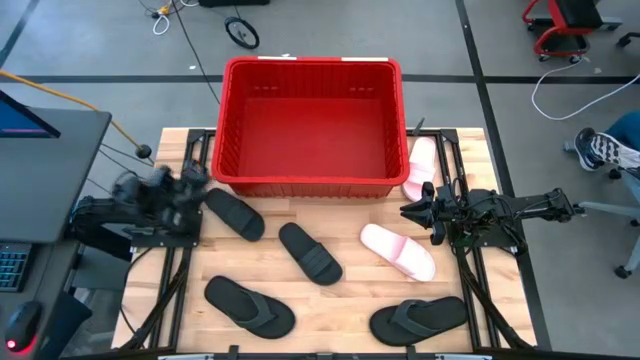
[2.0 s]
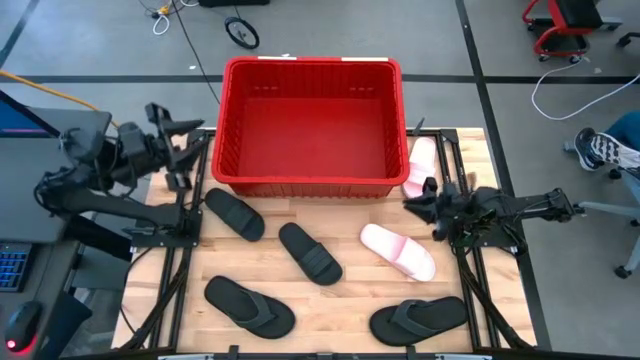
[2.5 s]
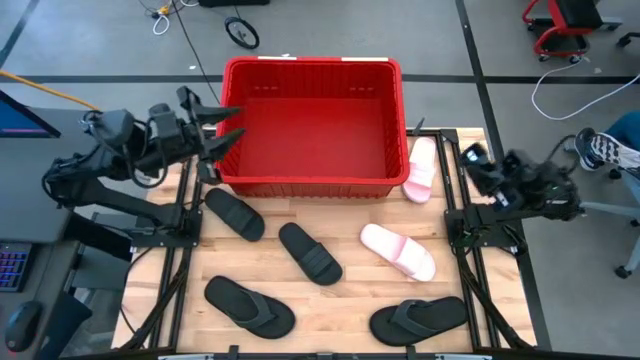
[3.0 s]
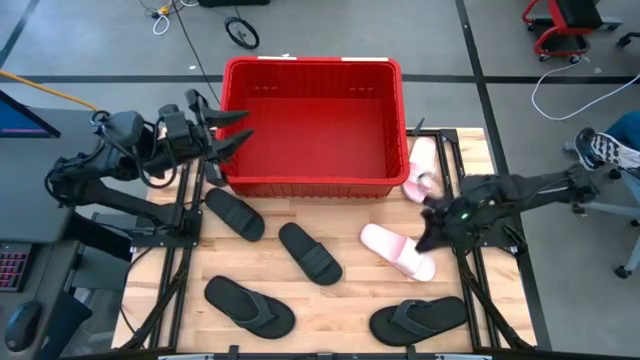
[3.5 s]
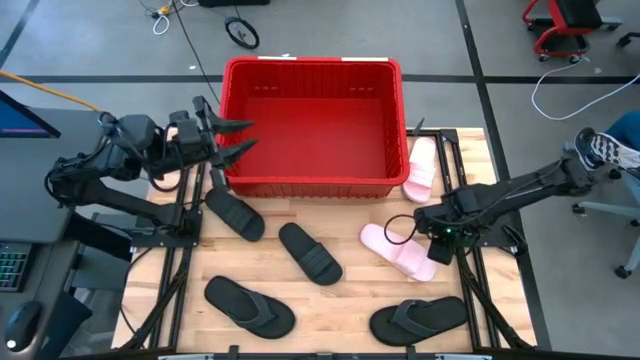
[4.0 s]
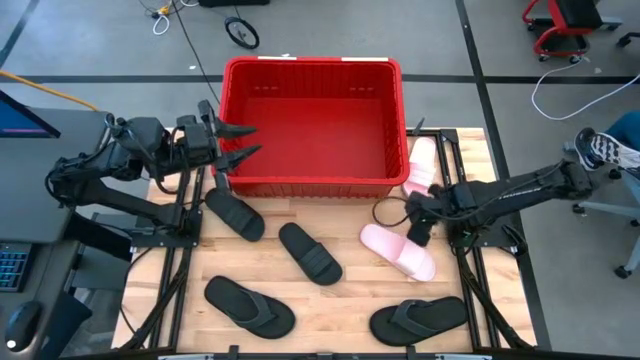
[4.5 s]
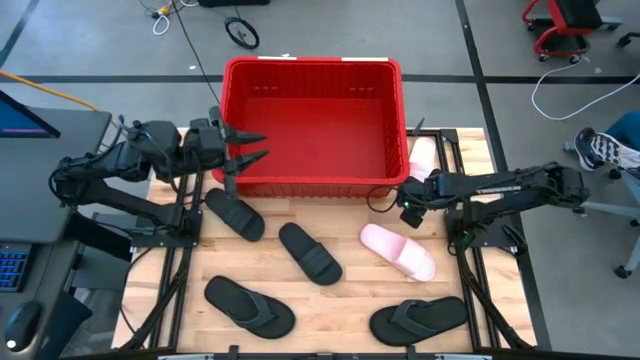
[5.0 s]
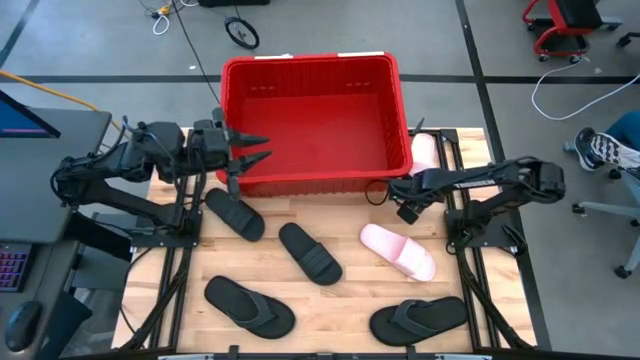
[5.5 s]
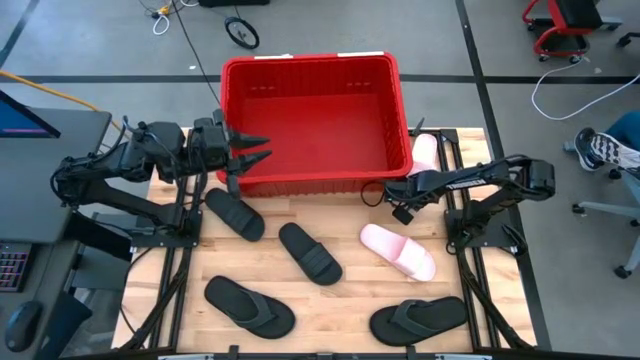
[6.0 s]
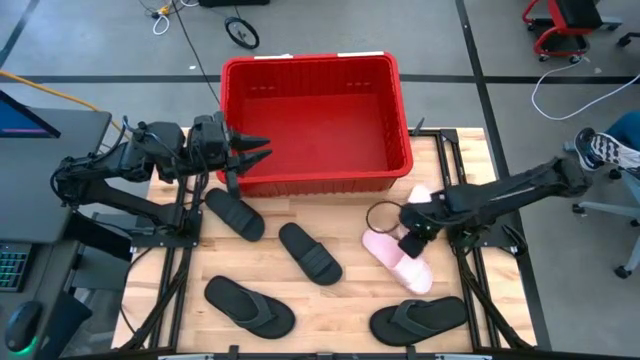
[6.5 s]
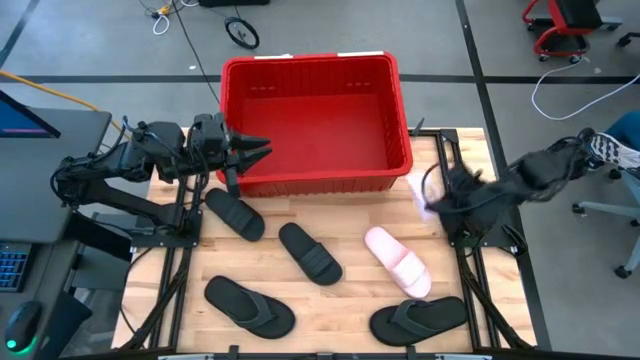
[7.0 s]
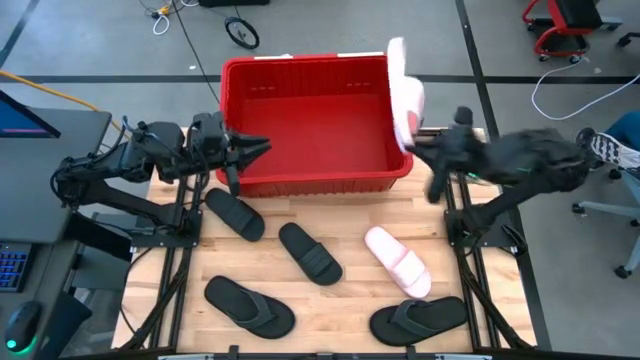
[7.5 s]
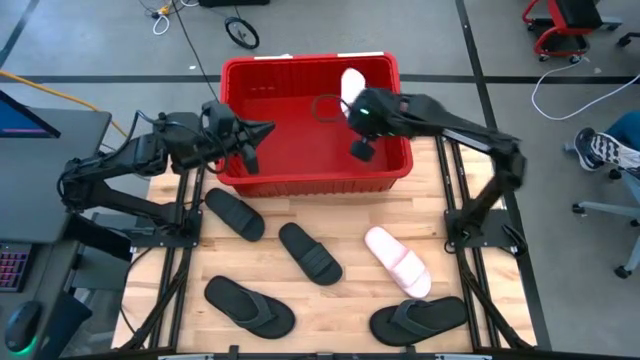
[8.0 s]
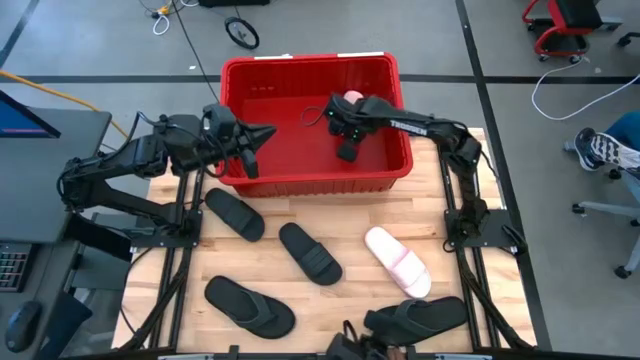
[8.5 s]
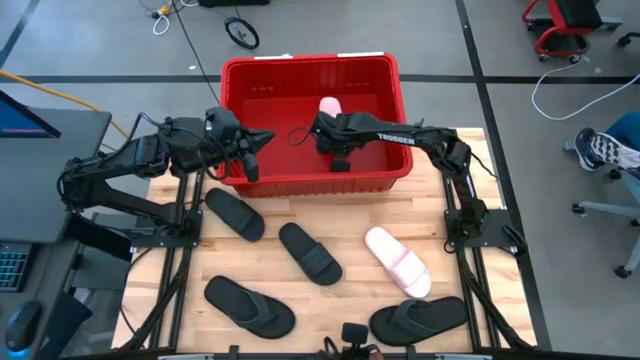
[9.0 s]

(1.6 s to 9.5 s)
Task: Pick and place slides into bin
Put the top pink slide into the red bin

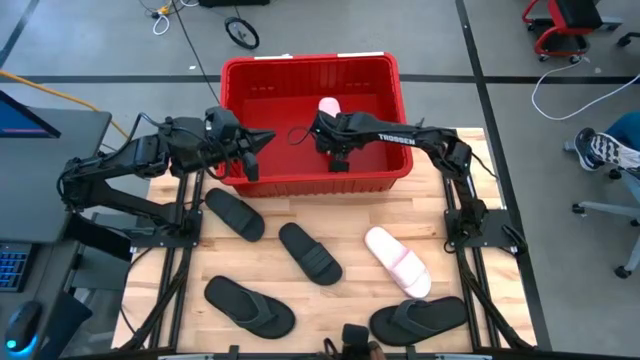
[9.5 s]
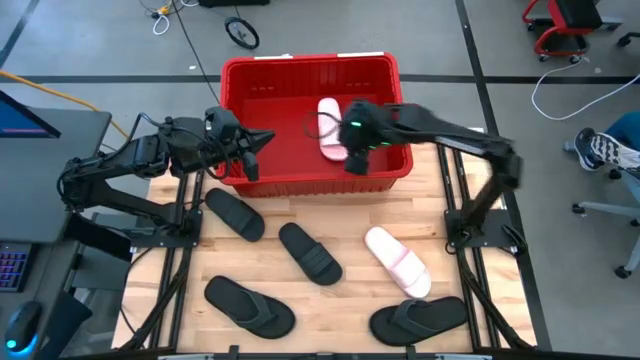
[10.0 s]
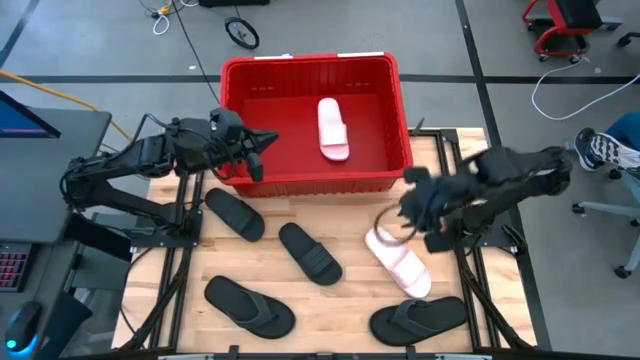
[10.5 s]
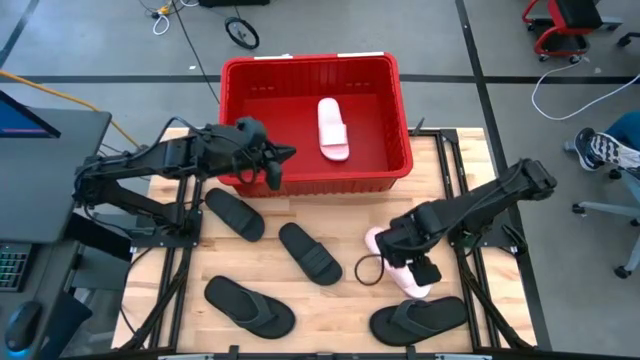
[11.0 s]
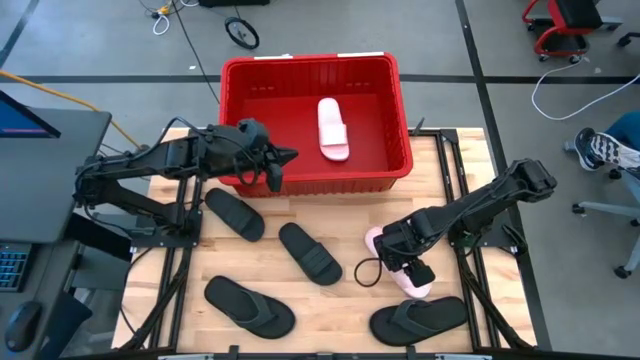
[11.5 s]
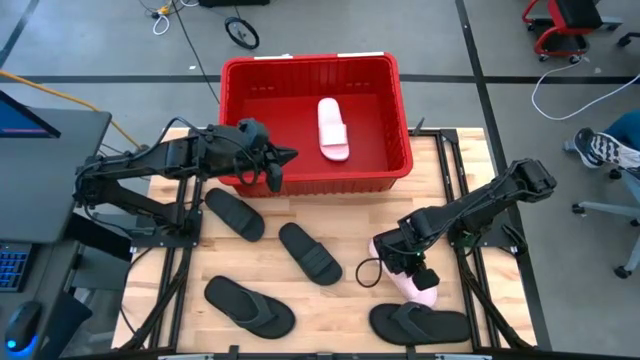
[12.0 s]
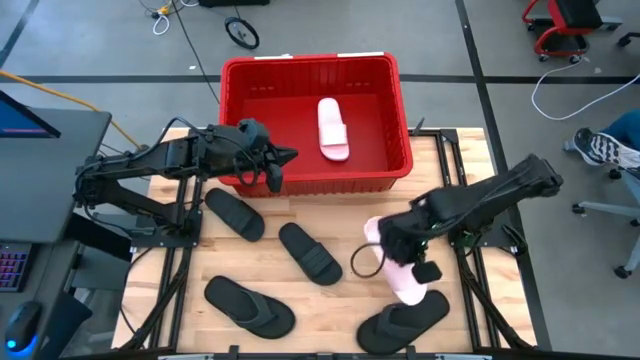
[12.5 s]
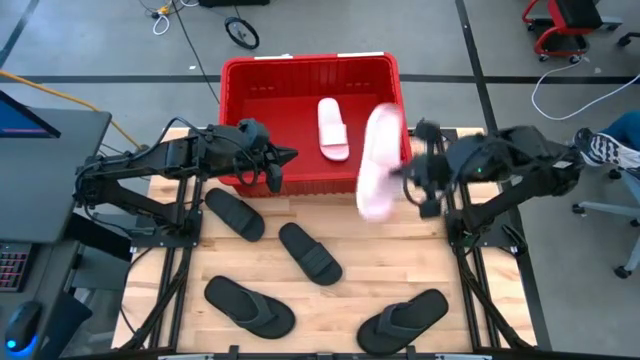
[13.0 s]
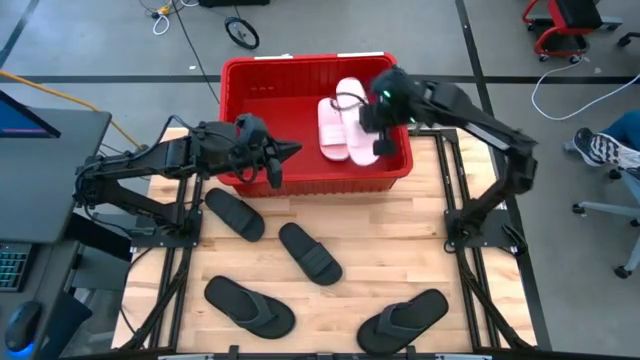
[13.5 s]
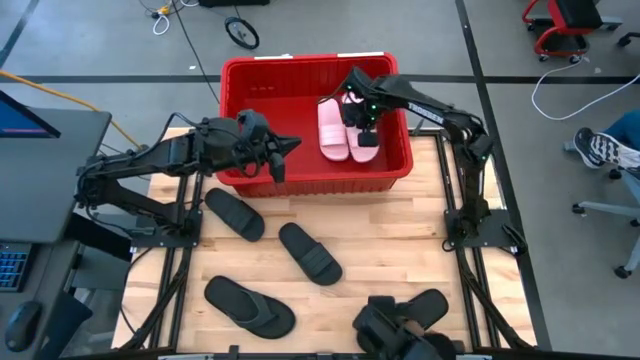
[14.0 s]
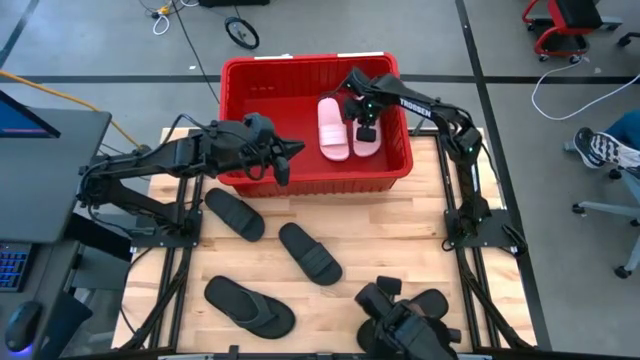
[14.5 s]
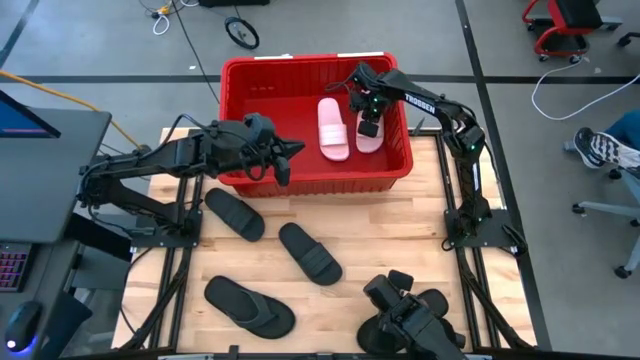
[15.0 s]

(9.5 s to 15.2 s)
Put the pink slide into the red bin

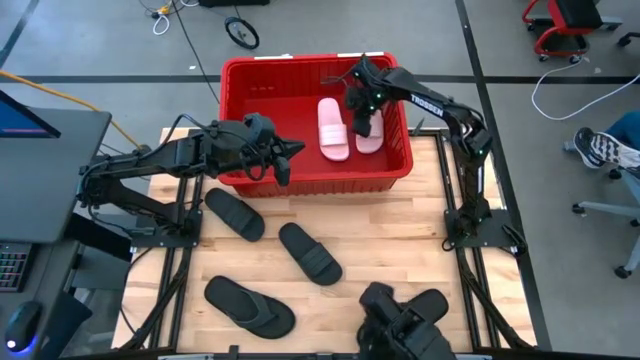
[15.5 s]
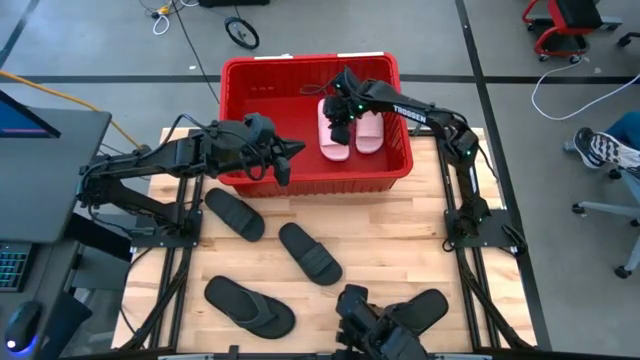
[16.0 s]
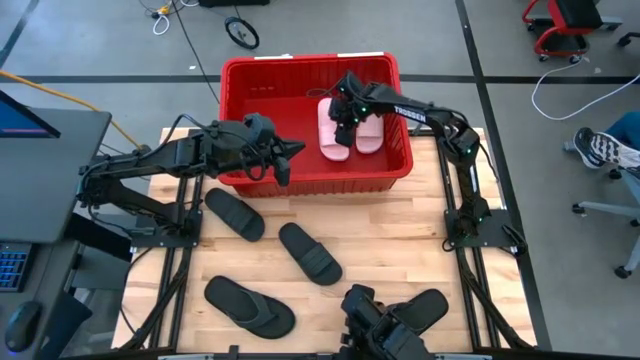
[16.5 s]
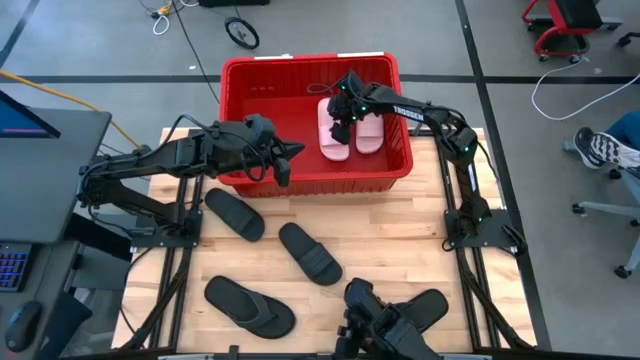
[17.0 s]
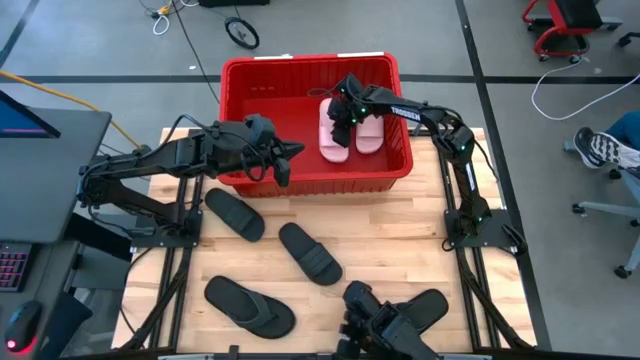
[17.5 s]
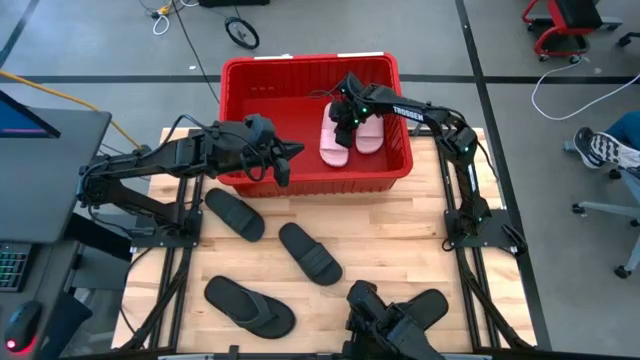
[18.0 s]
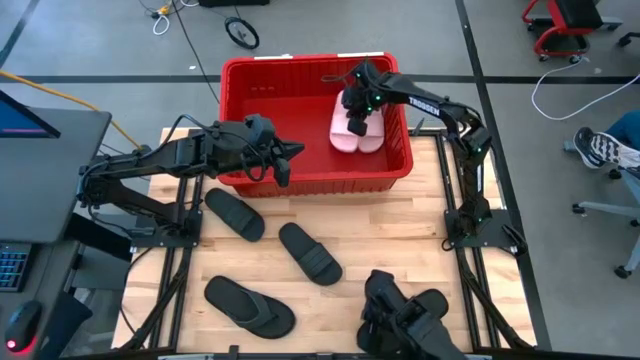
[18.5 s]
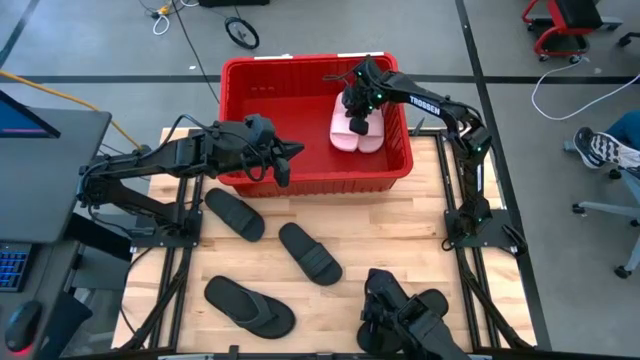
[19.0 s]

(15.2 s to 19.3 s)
Adjust the pink slide in the red bin

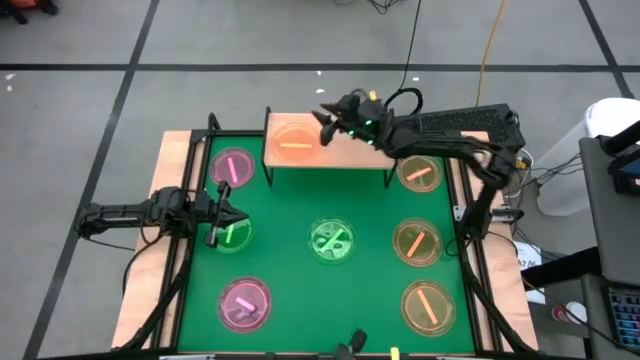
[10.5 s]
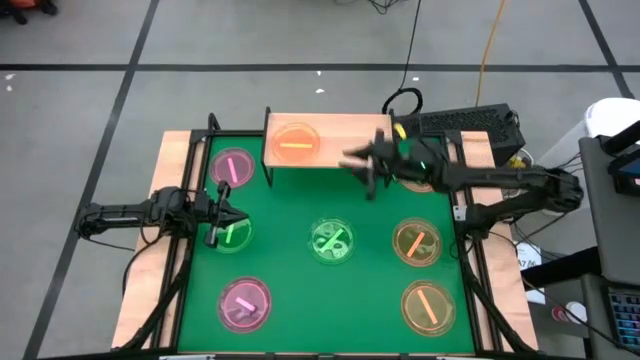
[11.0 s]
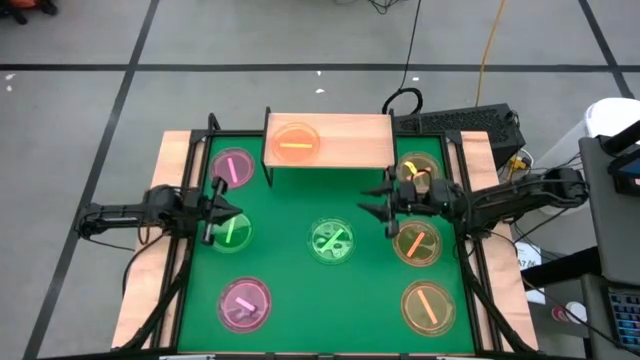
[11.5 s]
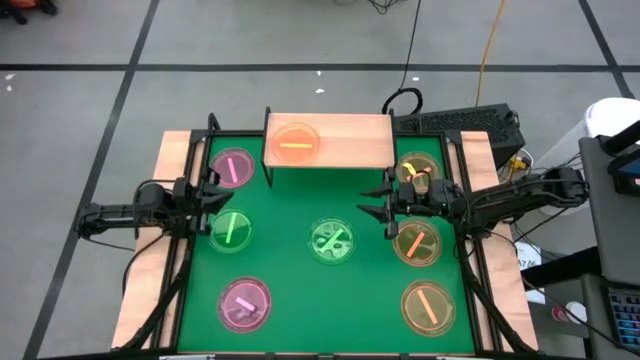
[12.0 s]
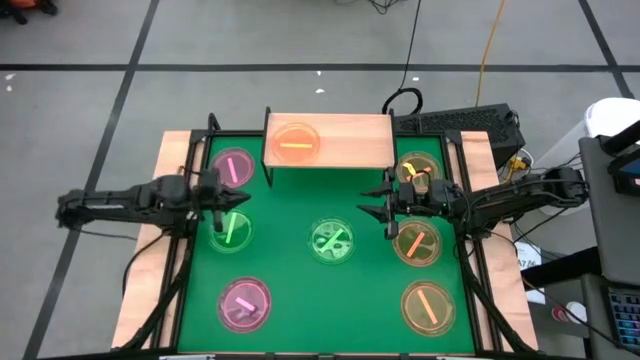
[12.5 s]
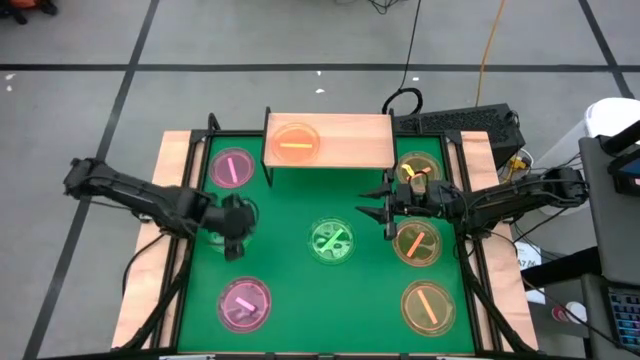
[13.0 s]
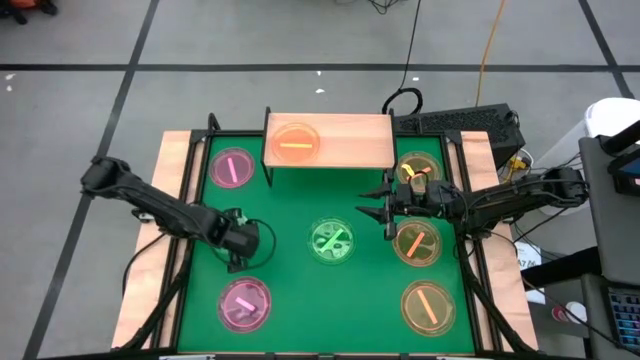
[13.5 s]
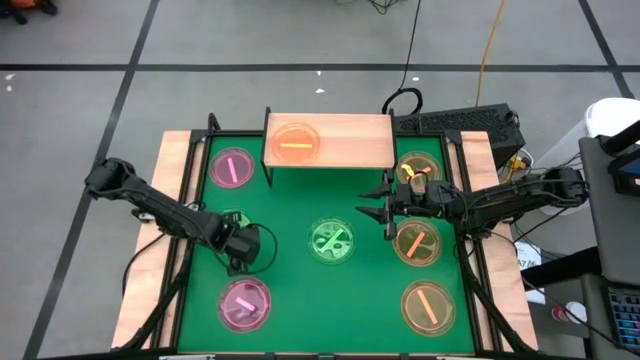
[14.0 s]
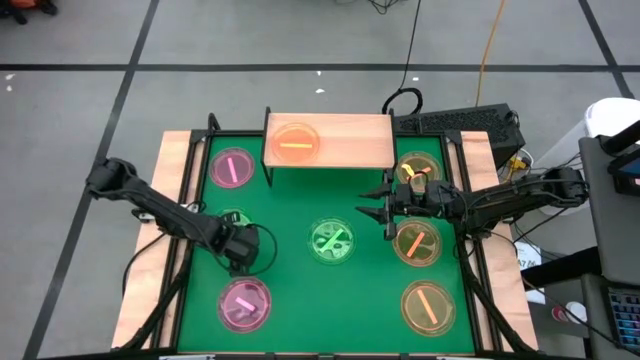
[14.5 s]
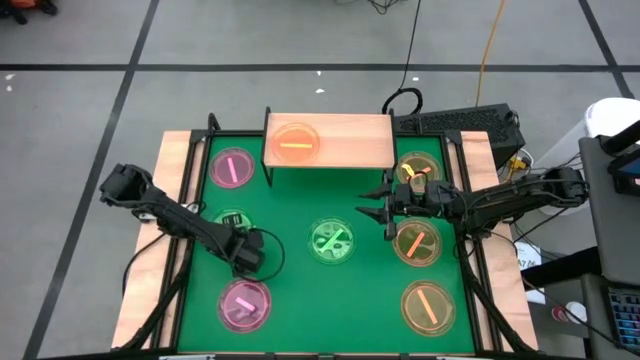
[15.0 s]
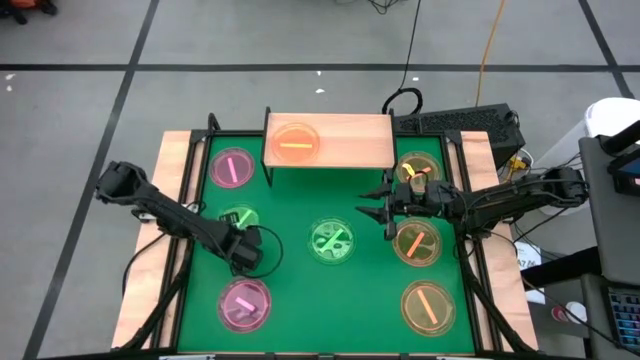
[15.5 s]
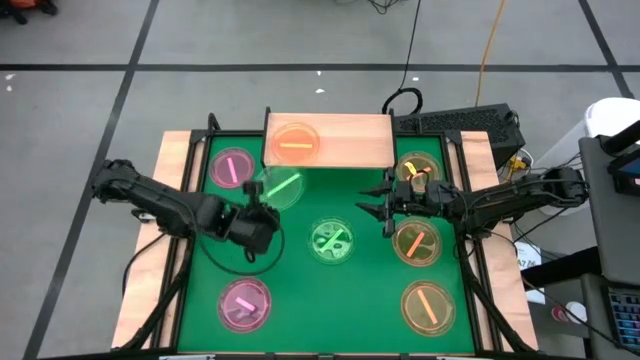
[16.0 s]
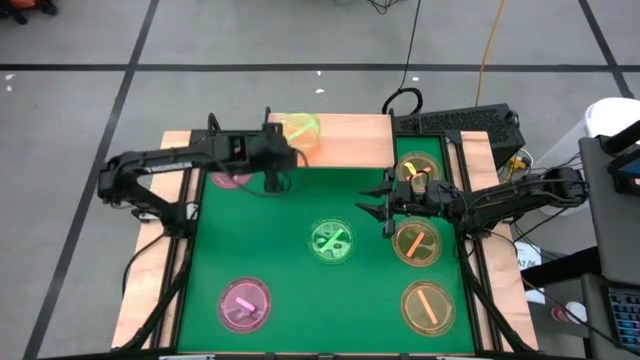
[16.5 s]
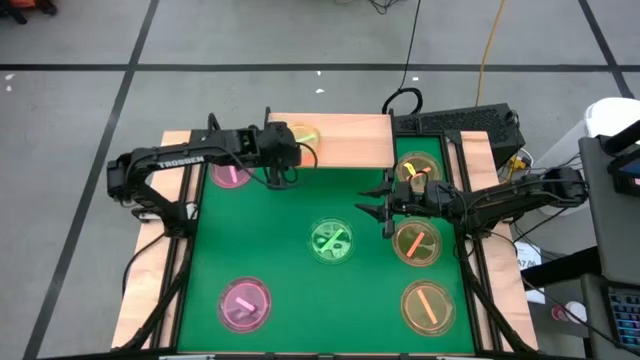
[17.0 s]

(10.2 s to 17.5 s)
Task: Place and stack plates onto a shelf
Stack the left green plate on top of the orange plate on the shelf
